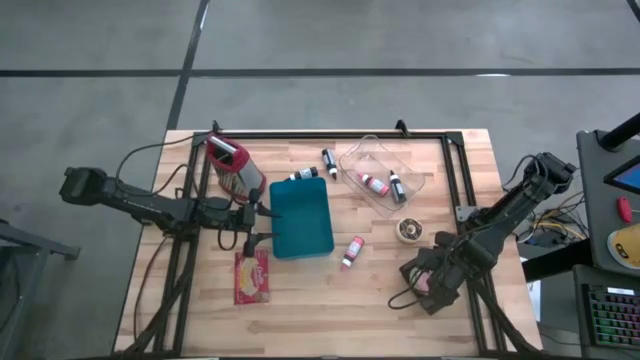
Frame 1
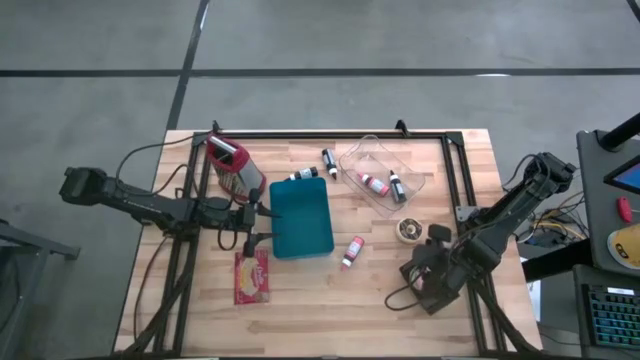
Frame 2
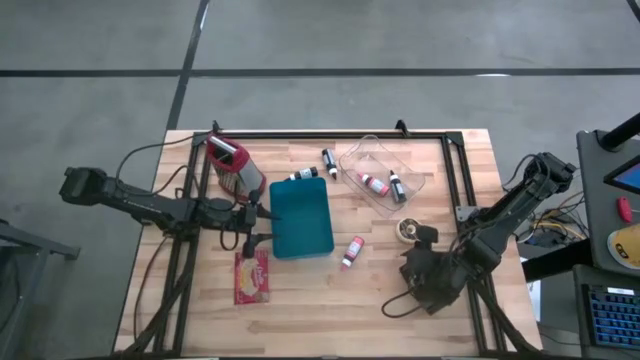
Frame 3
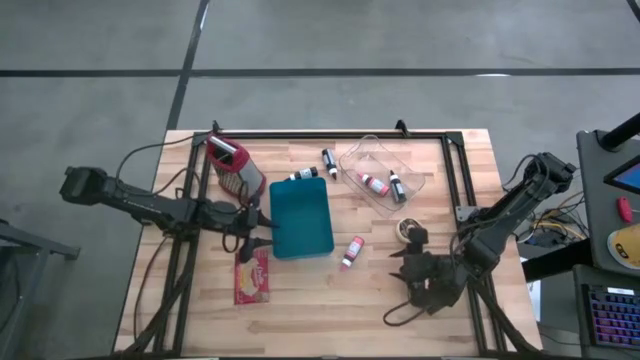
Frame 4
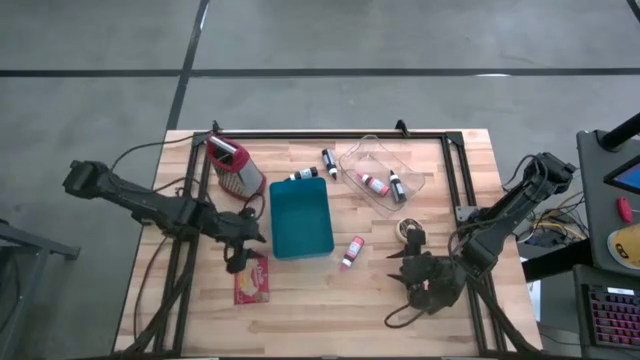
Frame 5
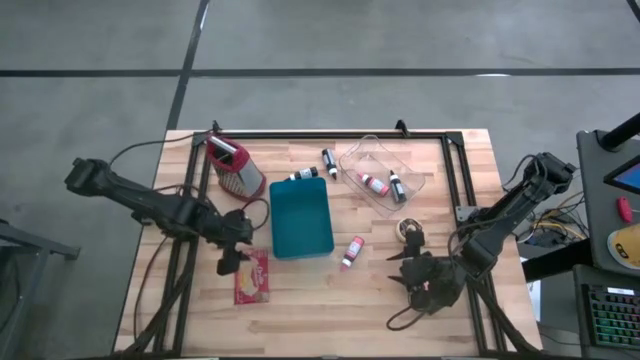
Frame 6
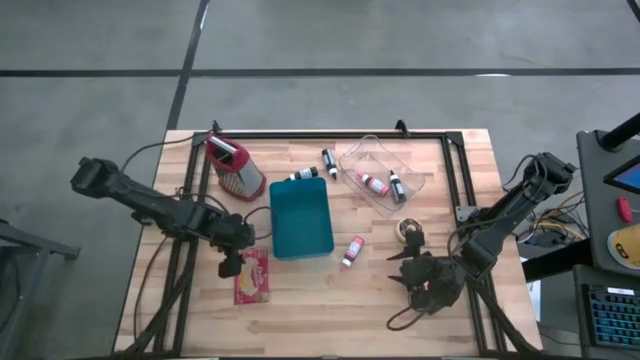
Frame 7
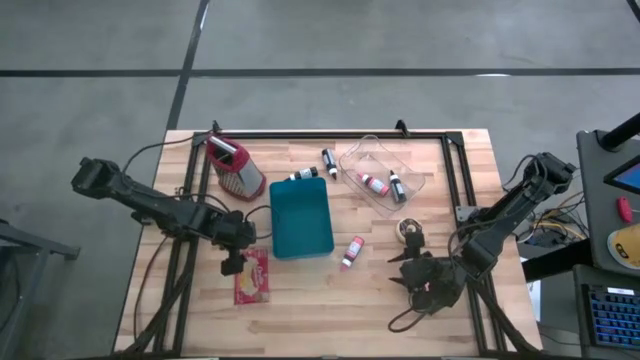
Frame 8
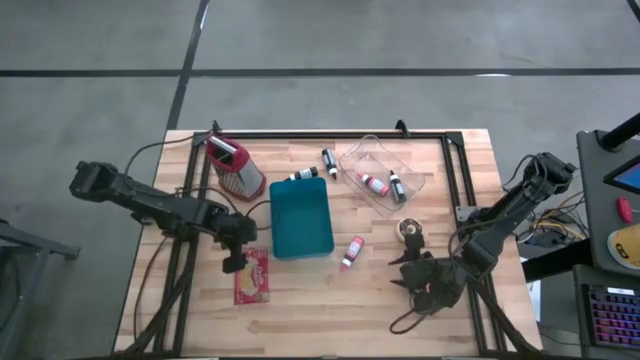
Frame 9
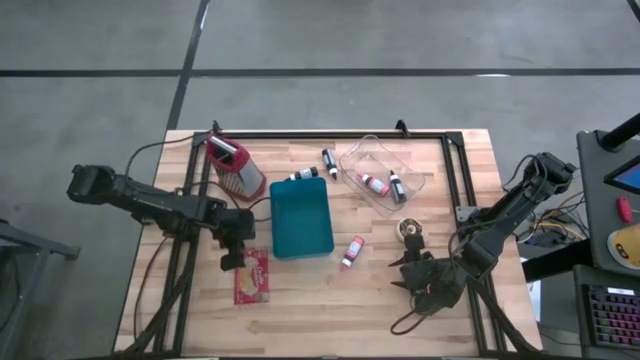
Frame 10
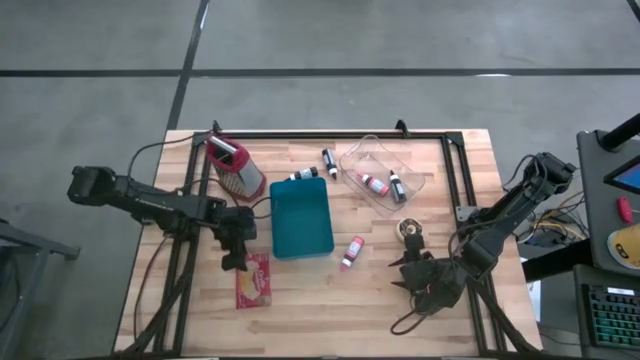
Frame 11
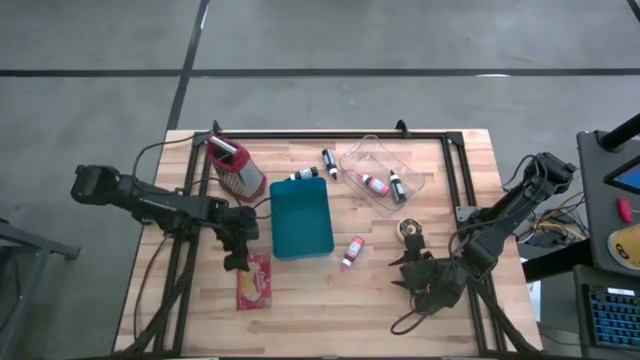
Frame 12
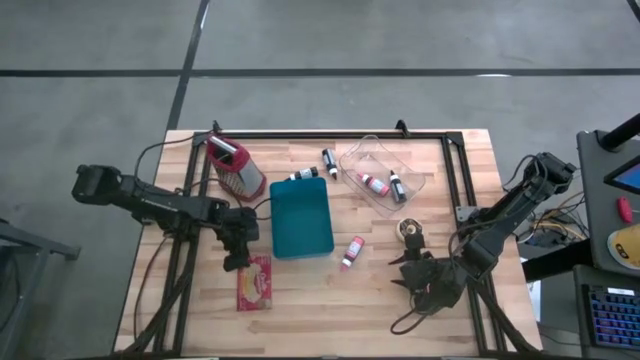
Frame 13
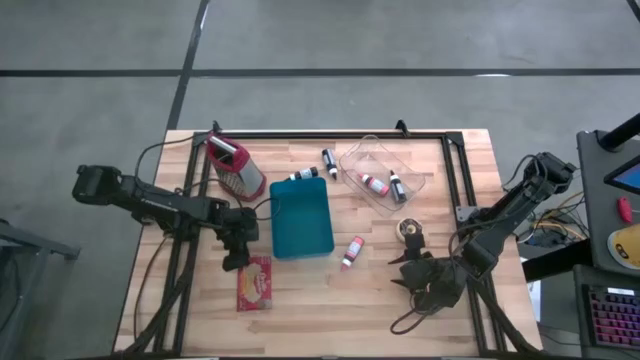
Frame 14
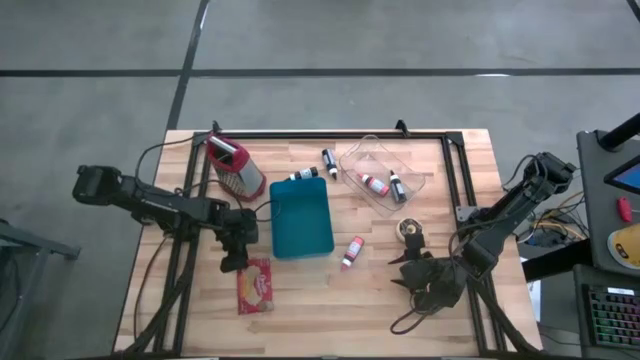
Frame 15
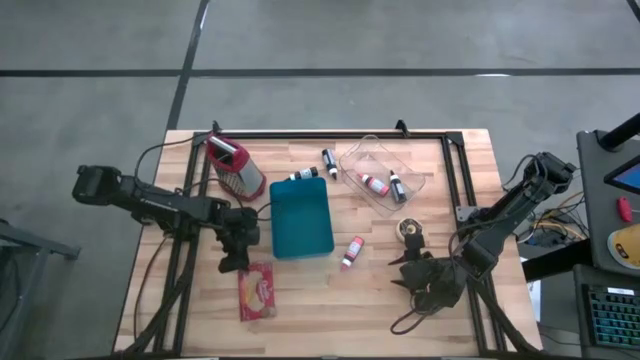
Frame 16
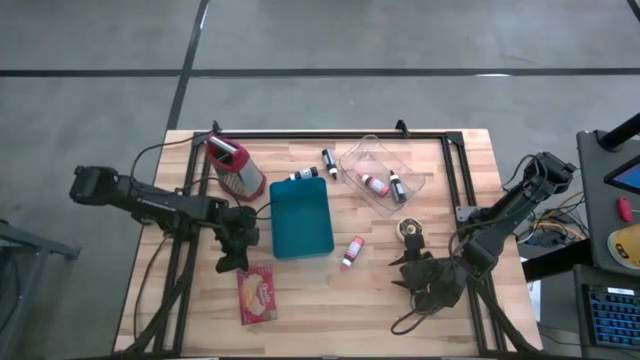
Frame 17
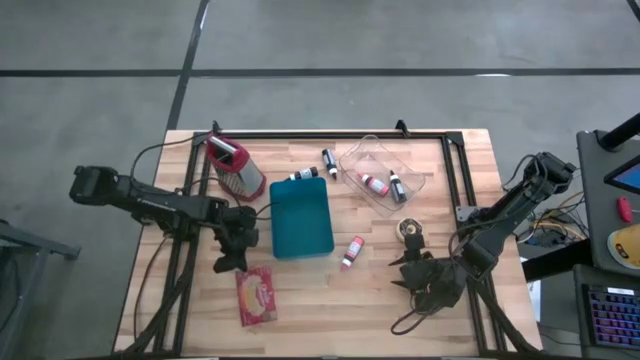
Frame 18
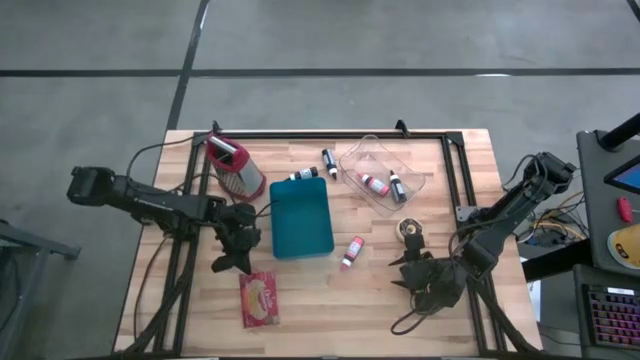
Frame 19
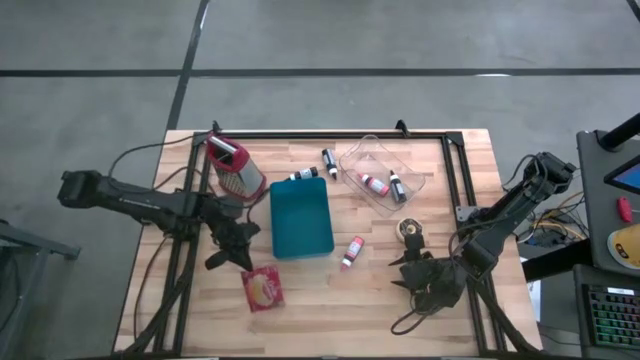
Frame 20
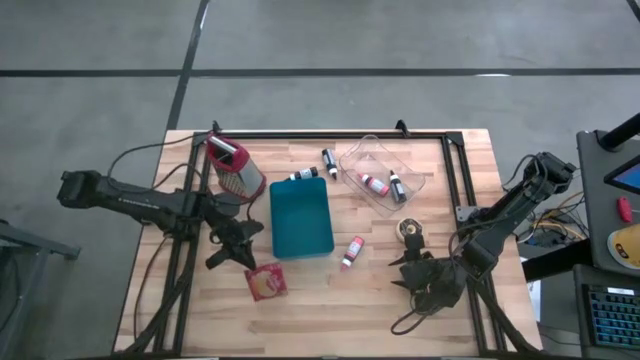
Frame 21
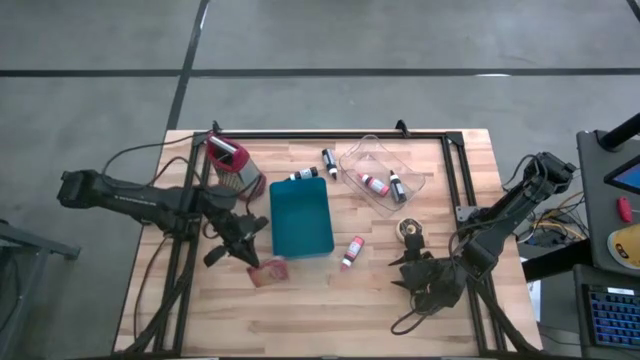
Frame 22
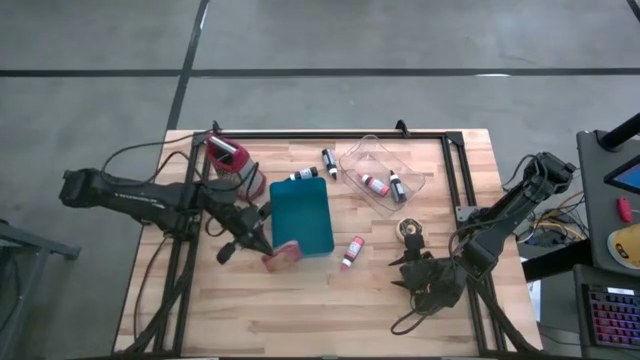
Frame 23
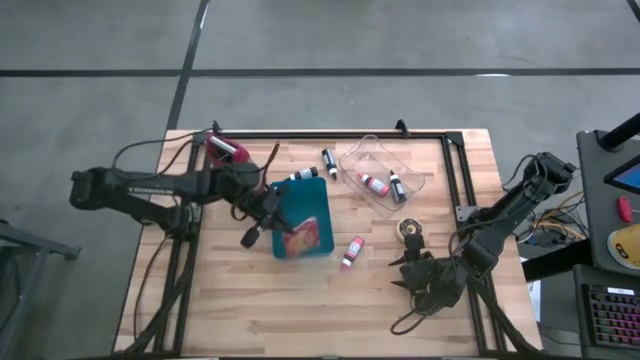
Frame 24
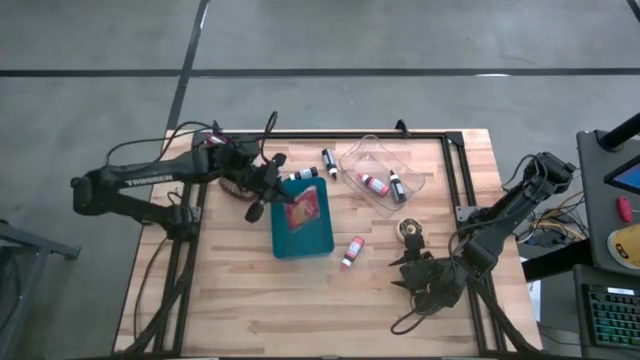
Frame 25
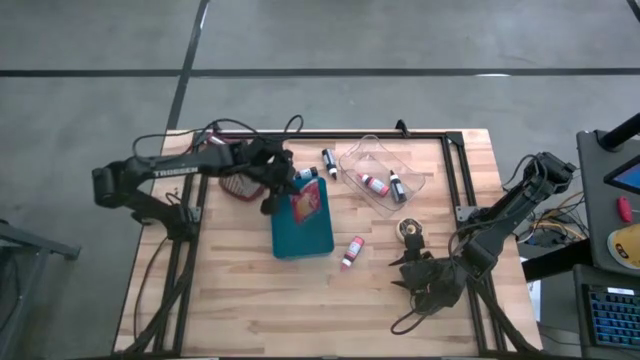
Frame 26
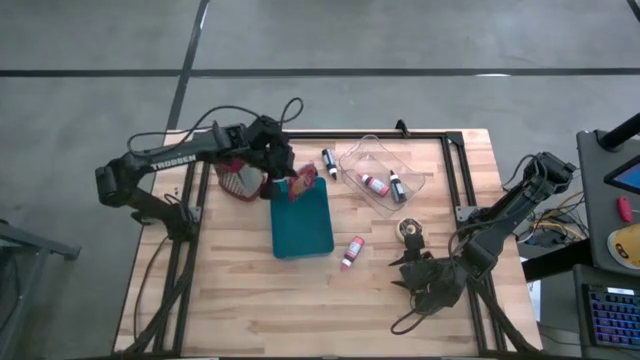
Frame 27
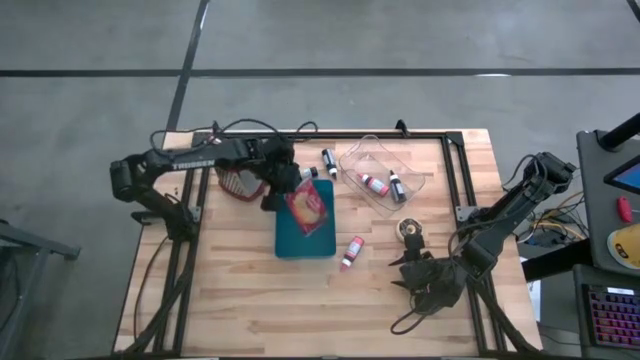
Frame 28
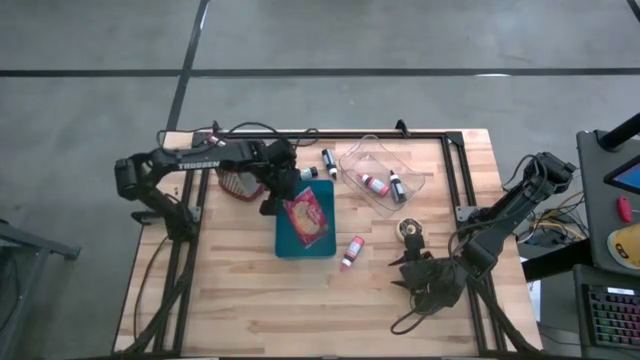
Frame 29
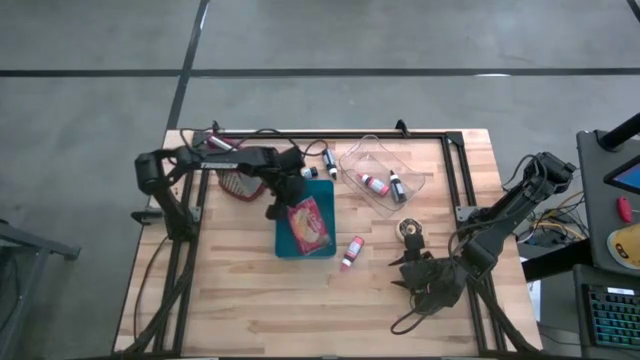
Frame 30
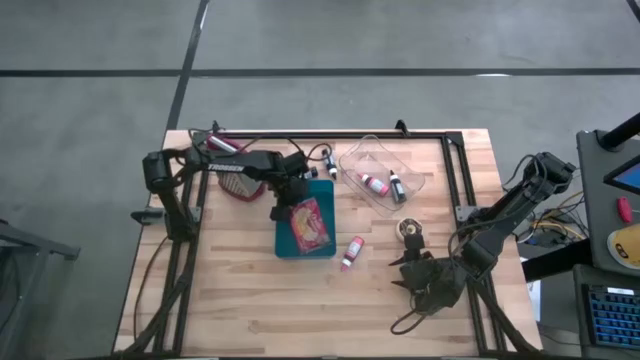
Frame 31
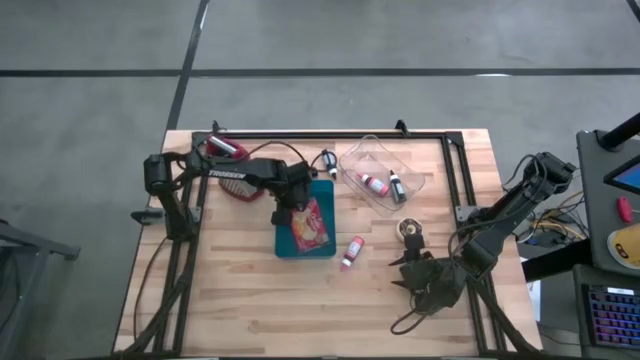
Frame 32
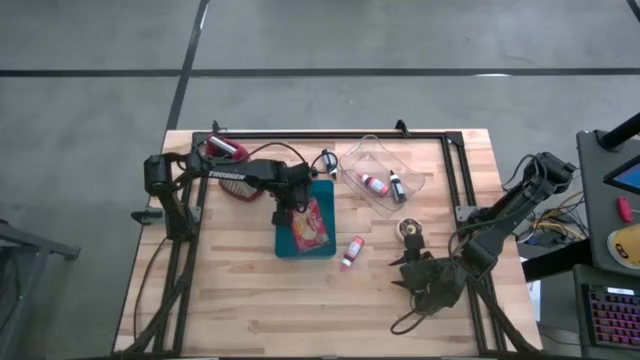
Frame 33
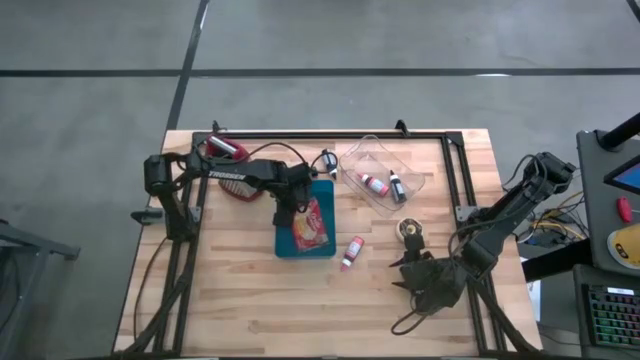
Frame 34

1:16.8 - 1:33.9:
Task: Pick & Place Food Item
Put the popcorn bag into the blue bin

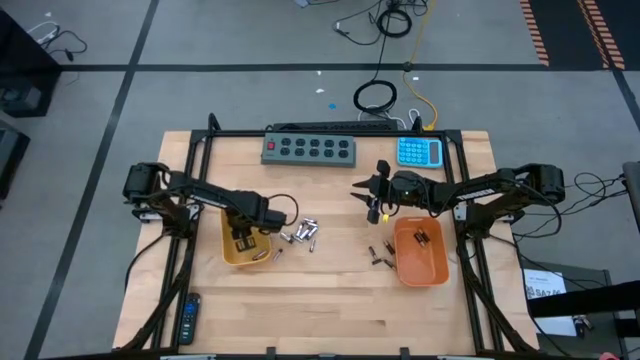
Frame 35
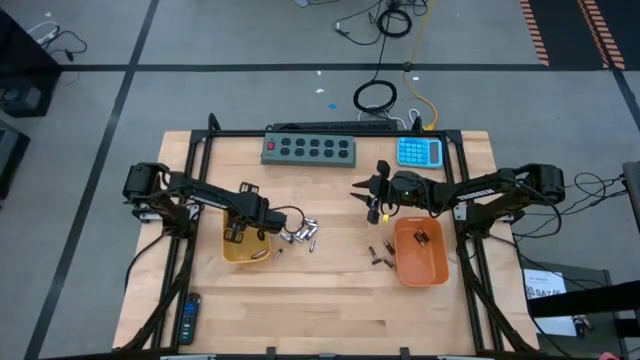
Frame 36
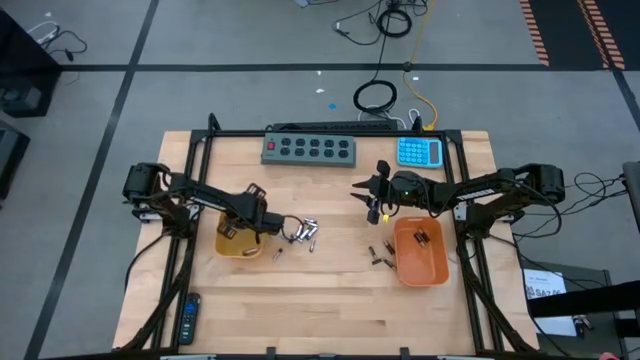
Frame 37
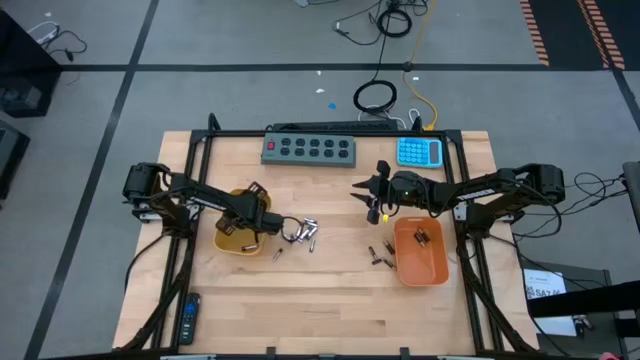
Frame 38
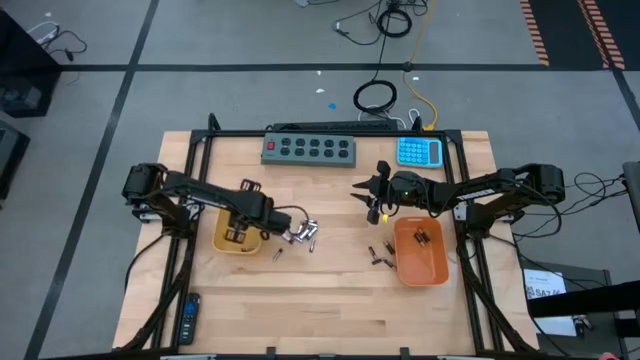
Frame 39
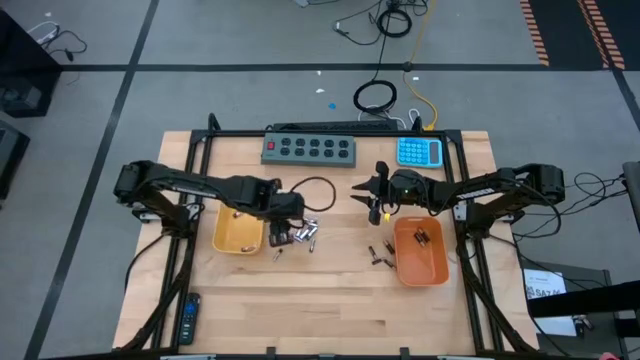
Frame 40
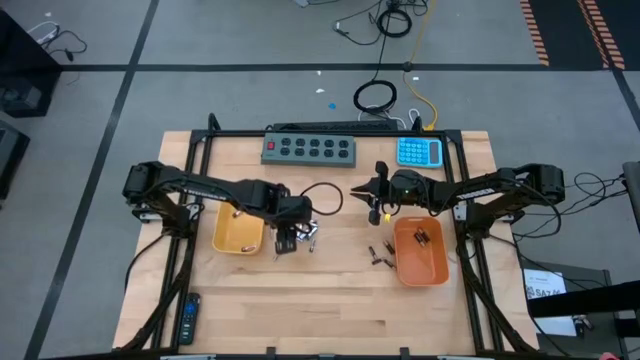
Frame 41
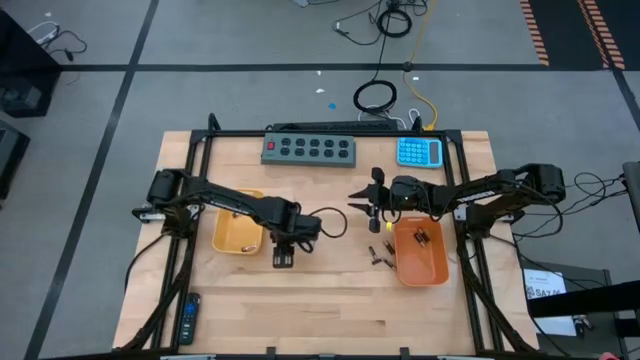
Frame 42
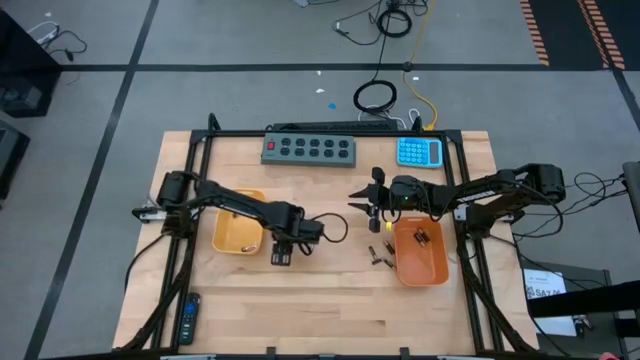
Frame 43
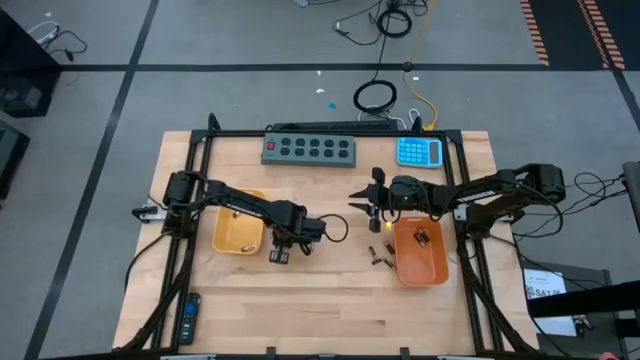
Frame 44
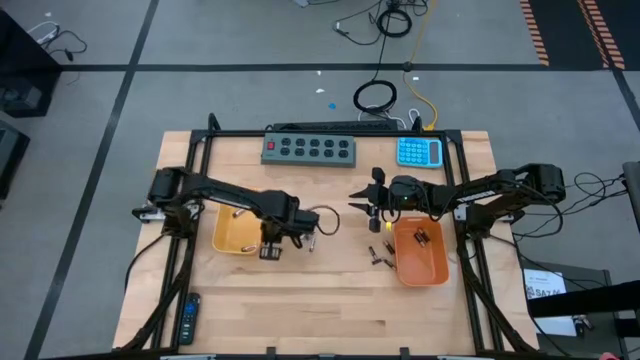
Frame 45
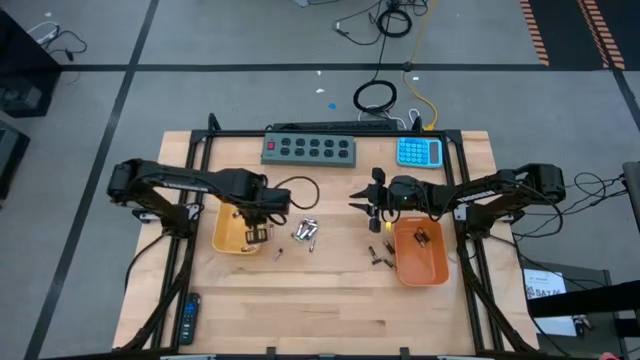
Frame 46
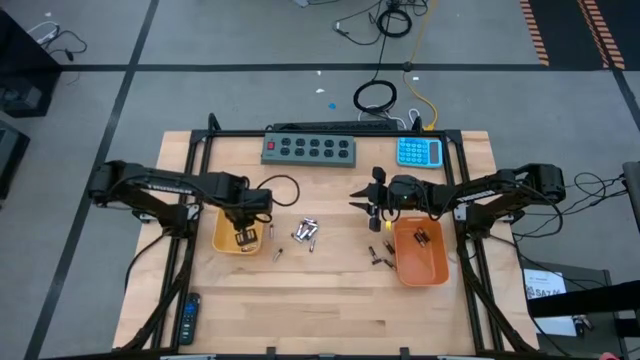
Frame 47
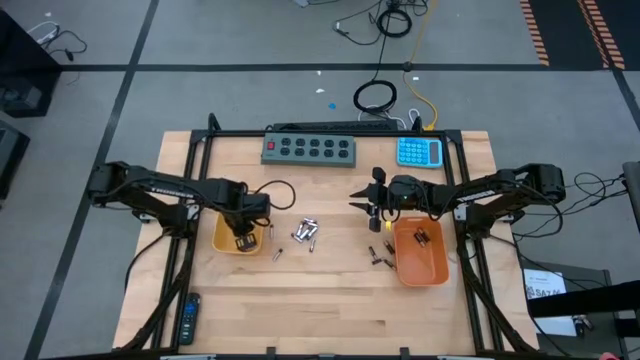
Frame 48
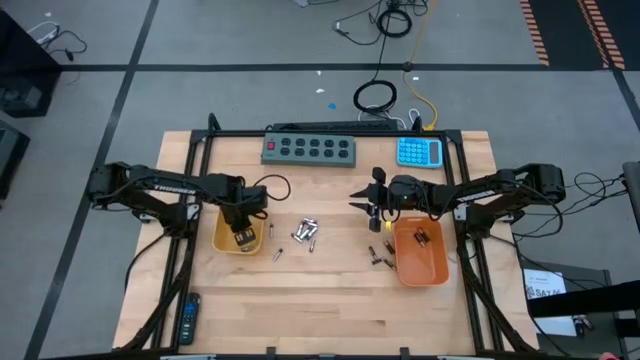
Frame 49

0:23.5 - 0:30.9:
Task: Sort batteries
Put the silver battery into the yellow bin
